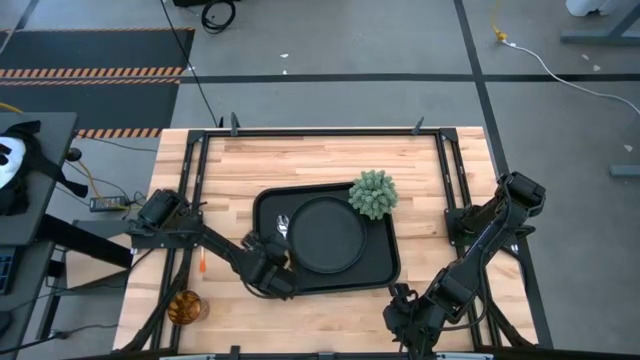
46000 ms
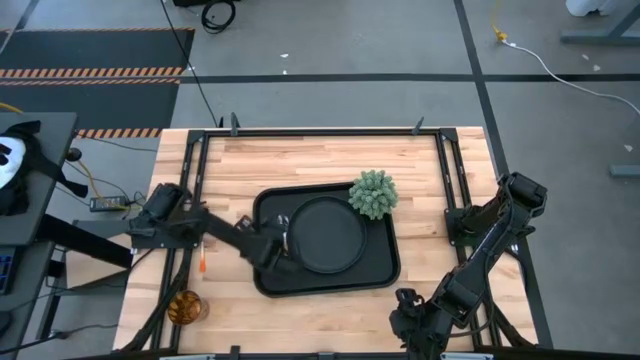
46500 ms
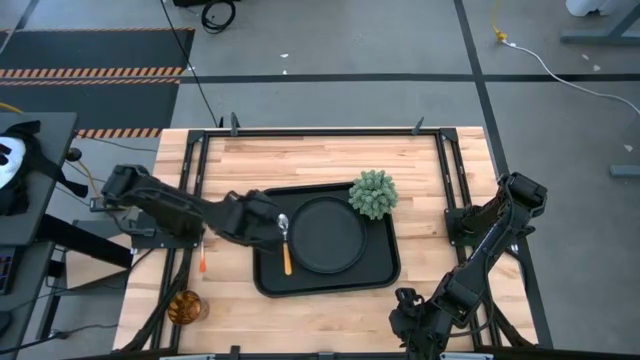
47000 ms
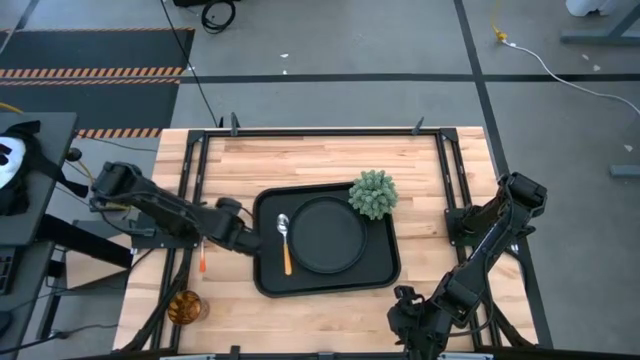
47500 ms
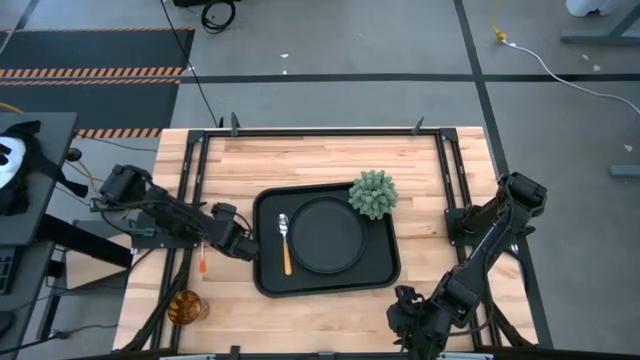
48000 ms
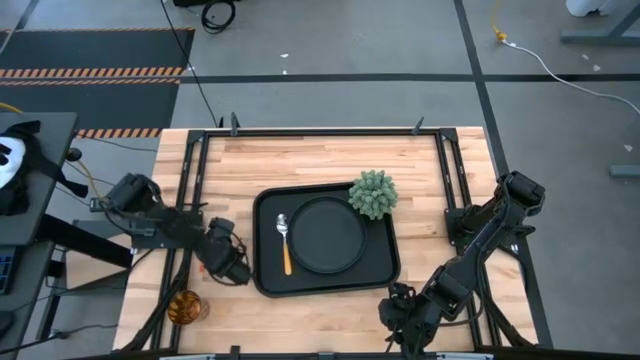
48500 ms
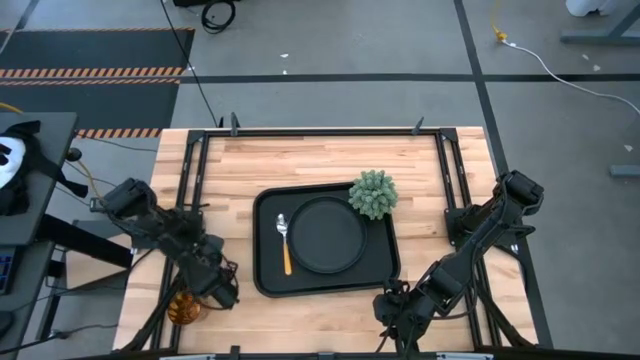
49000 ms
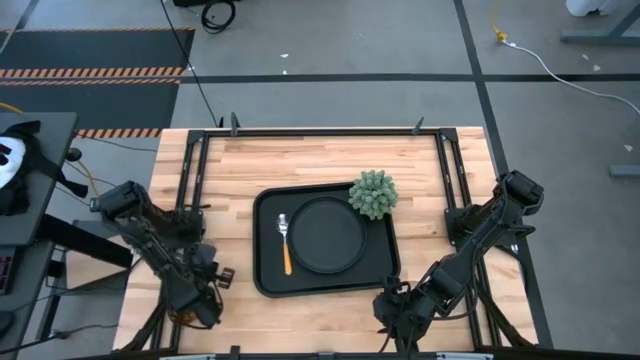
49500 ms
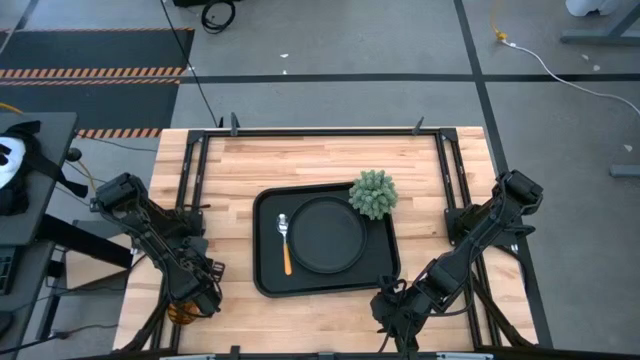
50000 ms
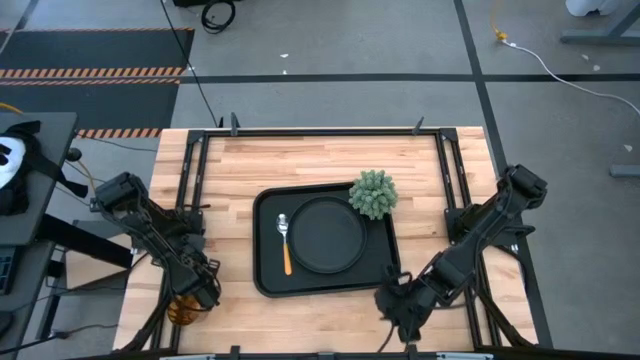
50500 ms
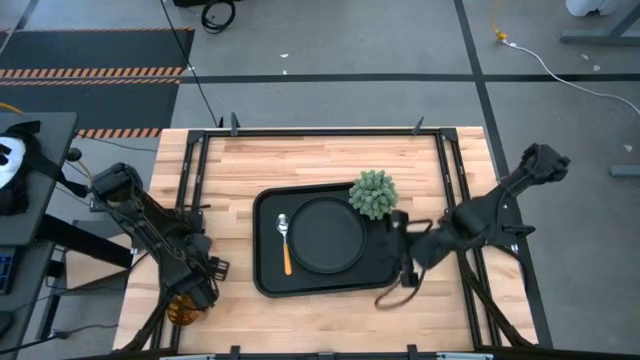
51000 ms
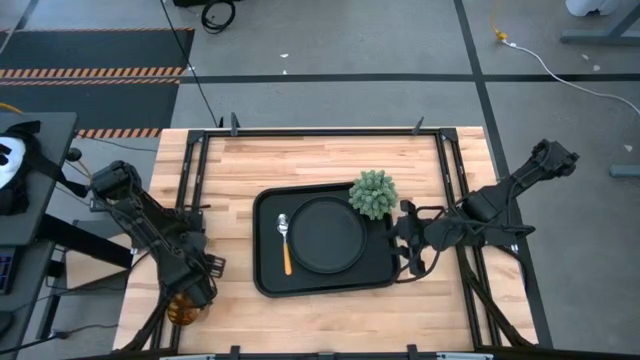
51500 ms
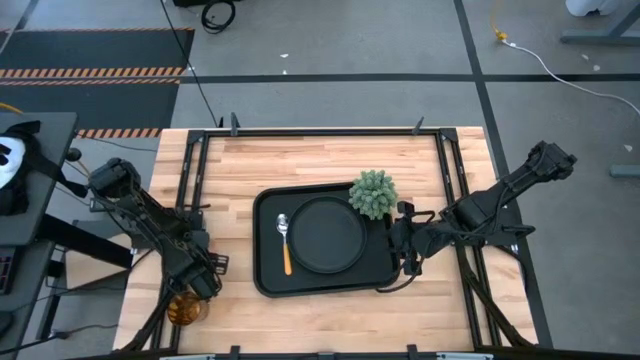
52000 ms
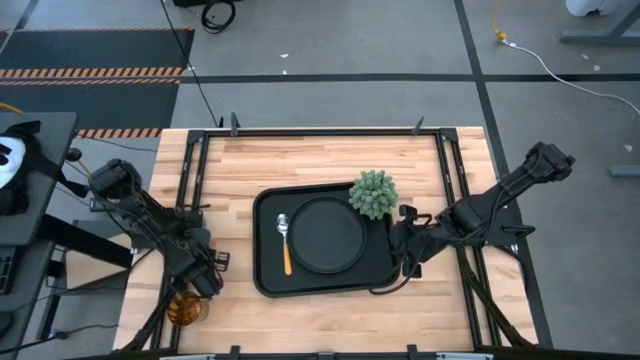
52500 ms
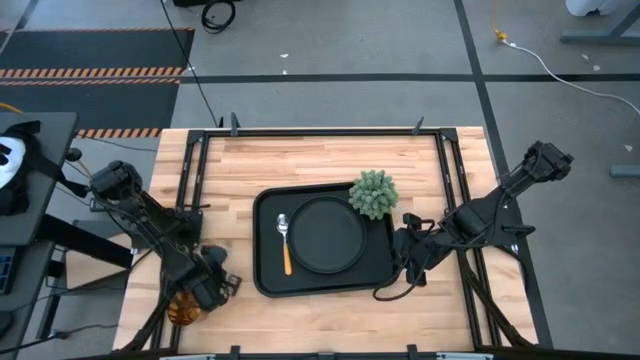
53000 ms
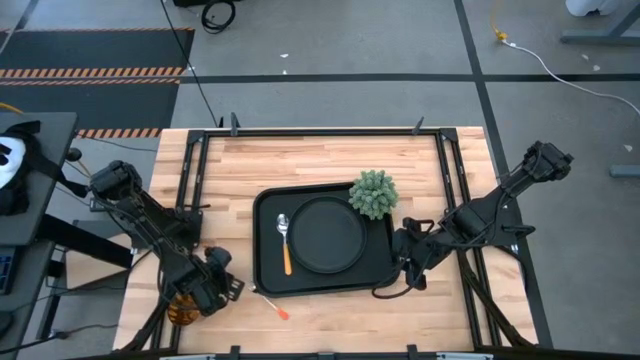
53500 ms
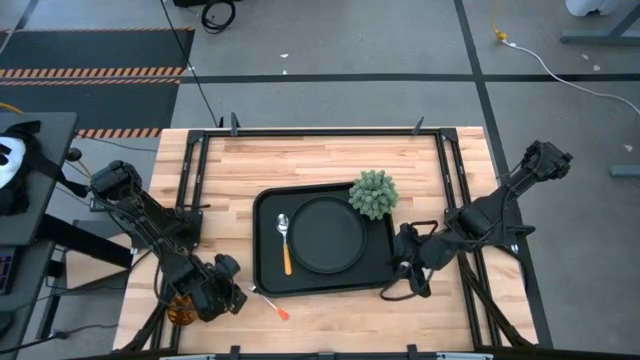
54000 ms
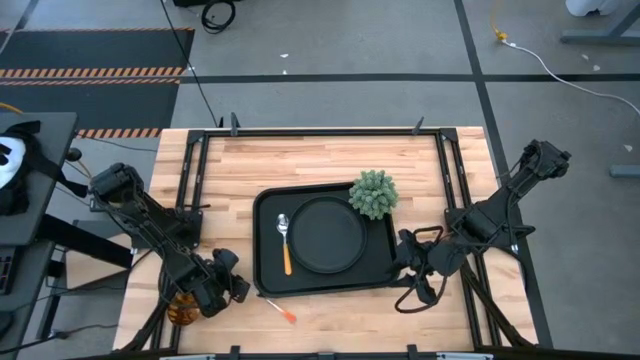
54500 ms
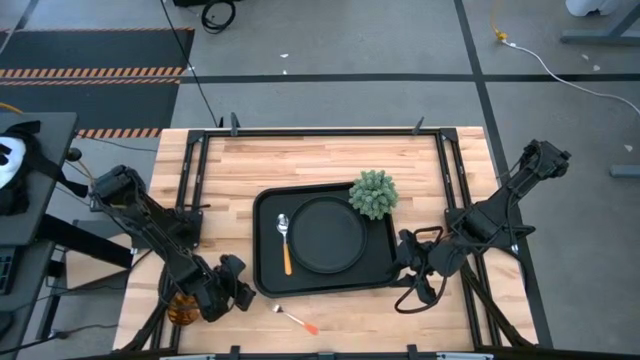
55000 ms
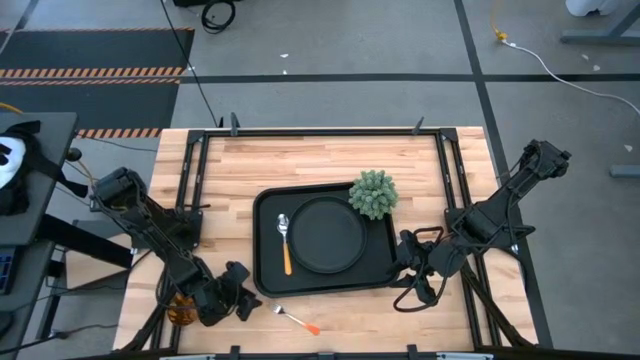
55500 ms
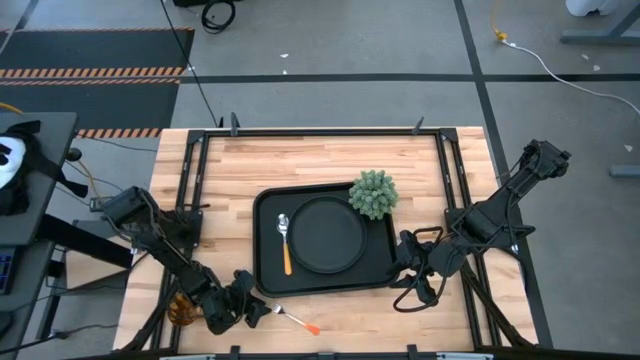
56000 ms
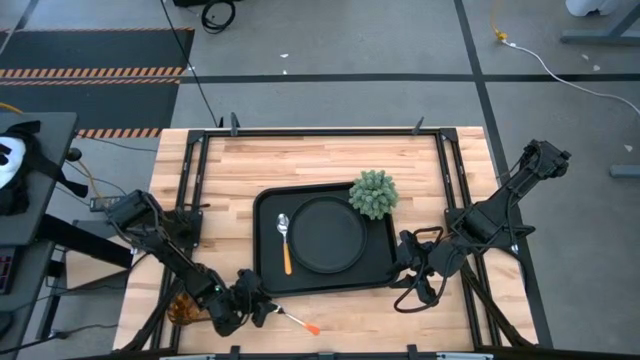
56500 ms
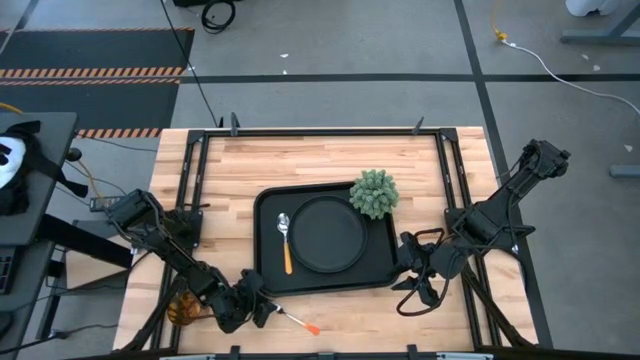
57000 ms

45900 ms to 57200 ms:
Task: Pick and place plate/cup/fork/spoon on tray
Put the orange fork on the black tray to the left of the orange spoon

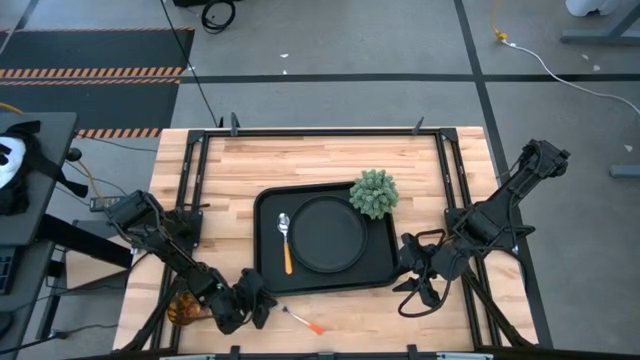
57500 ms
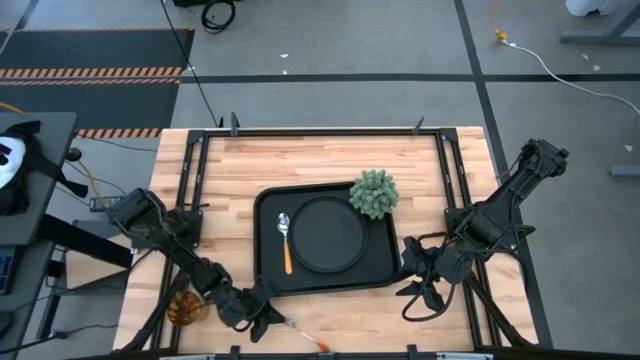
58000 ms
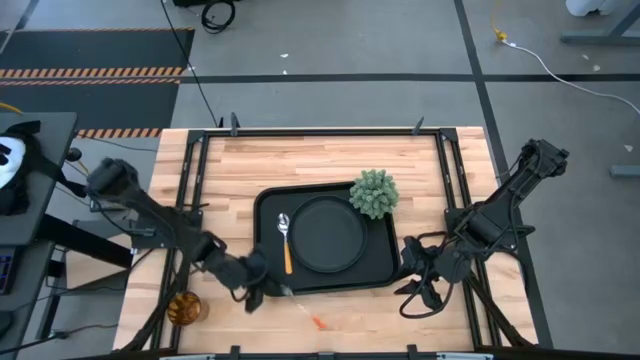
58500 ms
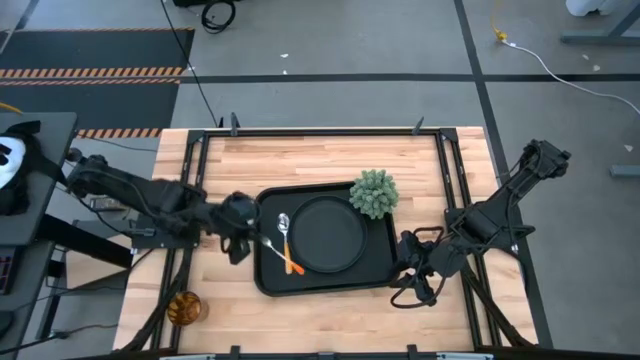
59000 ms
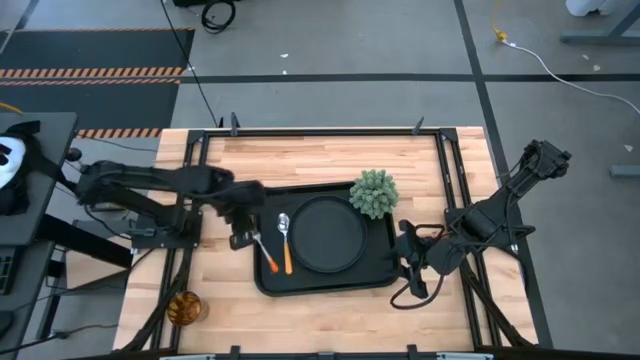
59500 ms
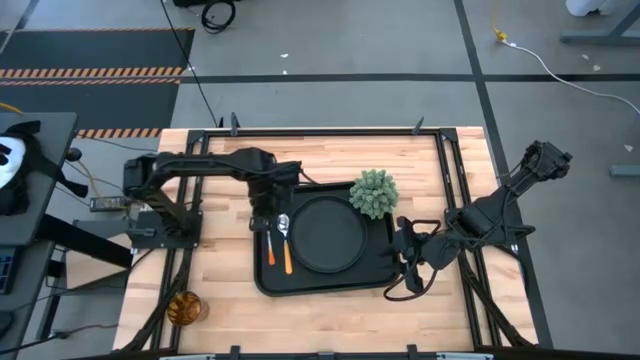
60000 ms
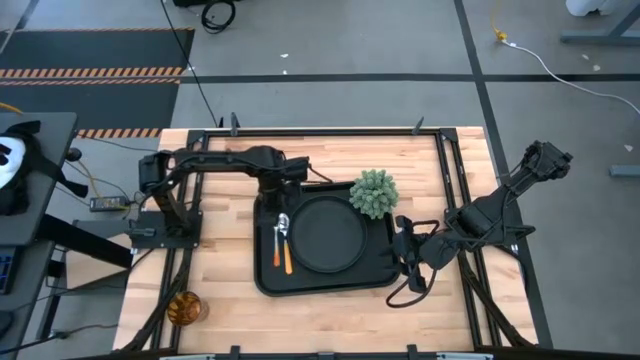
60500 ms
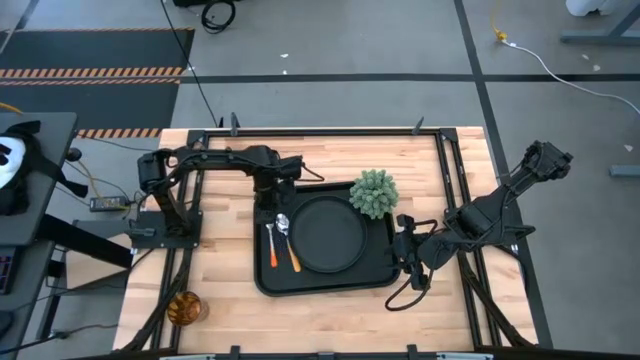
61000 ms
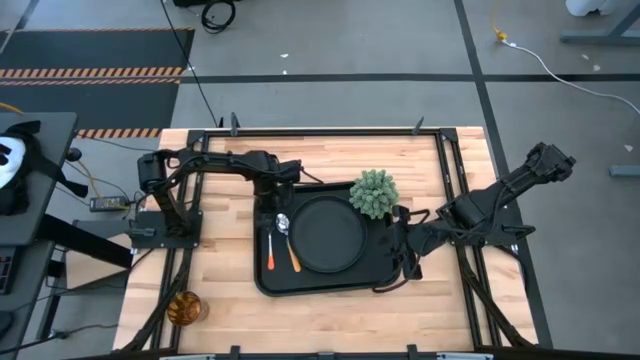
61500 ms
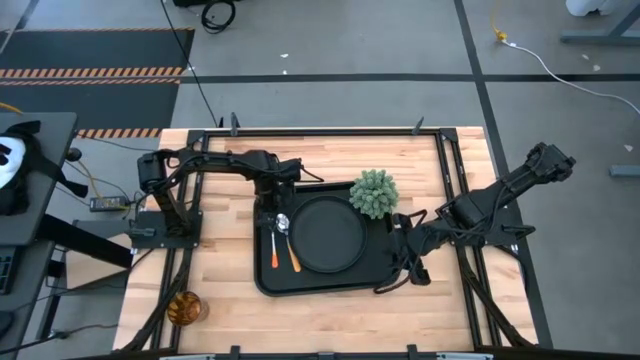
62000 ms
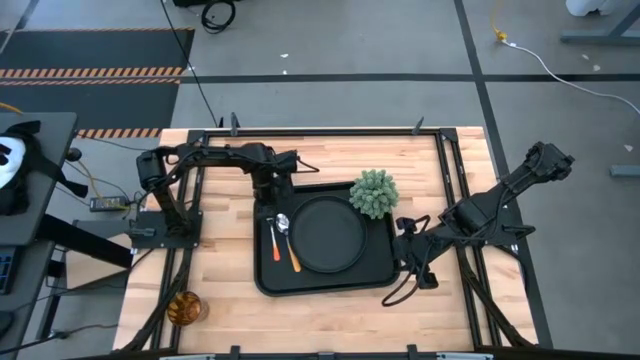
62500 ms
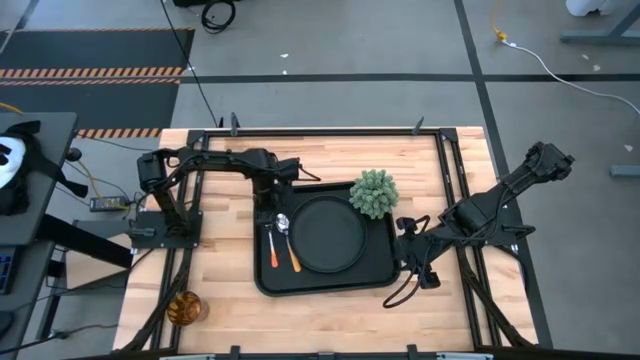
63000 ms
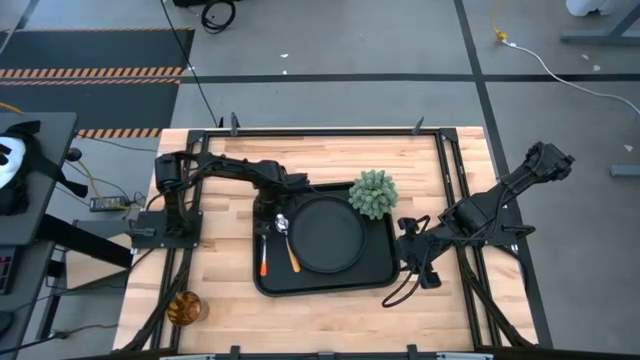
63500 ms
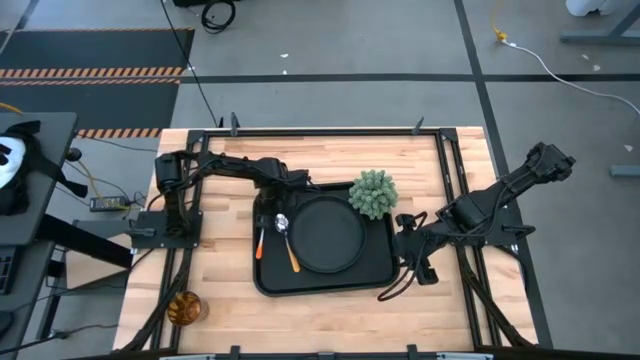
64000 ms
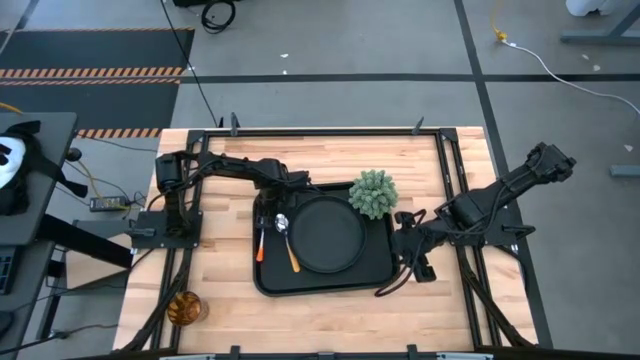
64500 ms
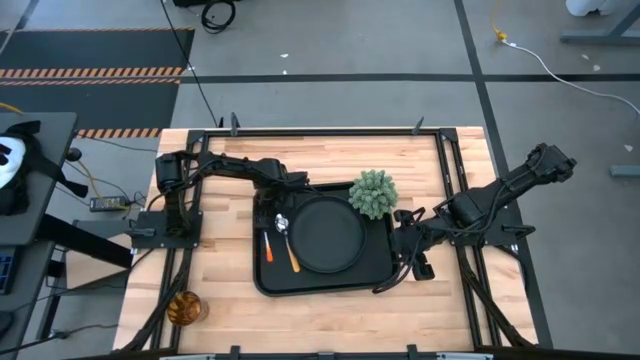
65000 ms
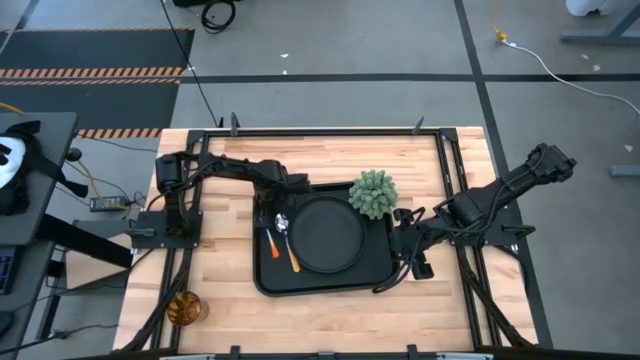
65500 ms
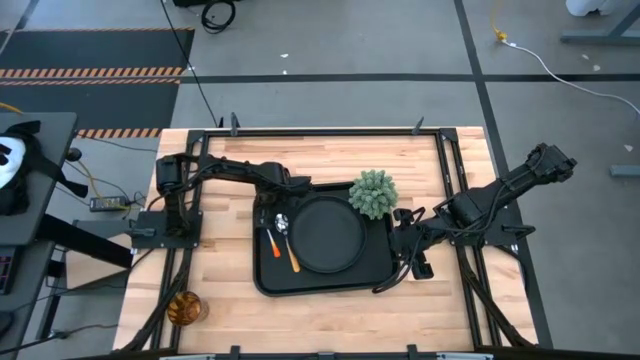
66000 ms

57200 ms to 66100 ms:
Put the orange fork on the black tray to the left of the orange spoon

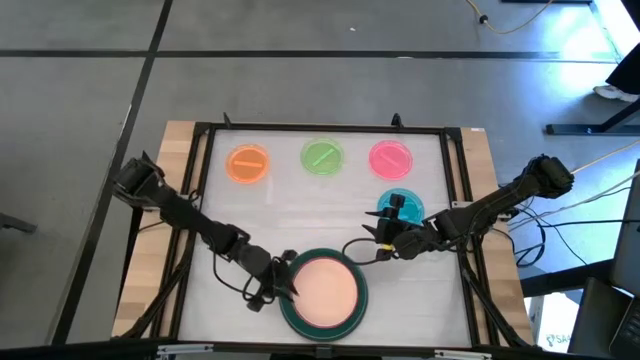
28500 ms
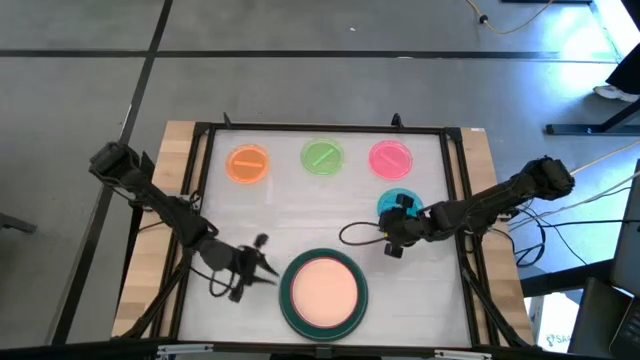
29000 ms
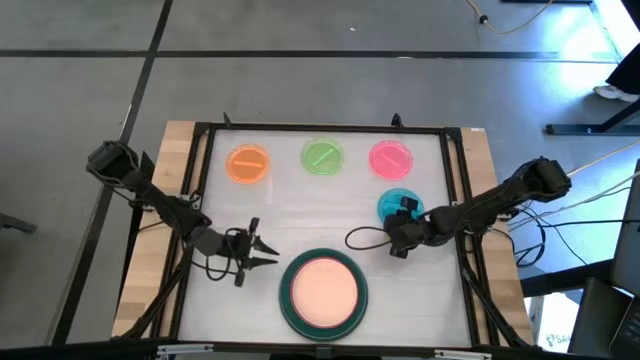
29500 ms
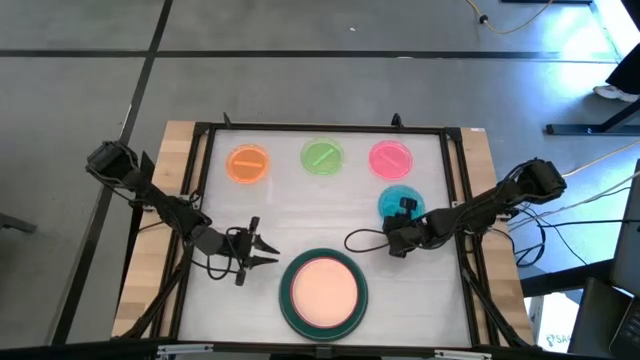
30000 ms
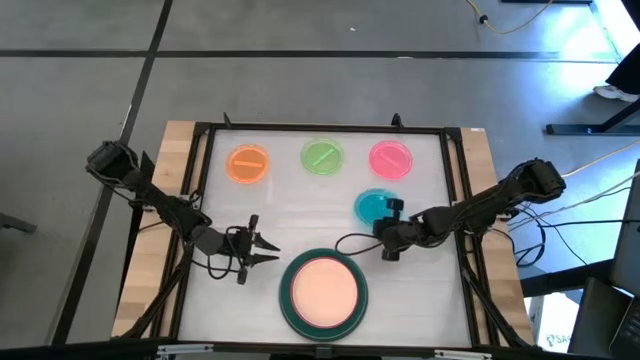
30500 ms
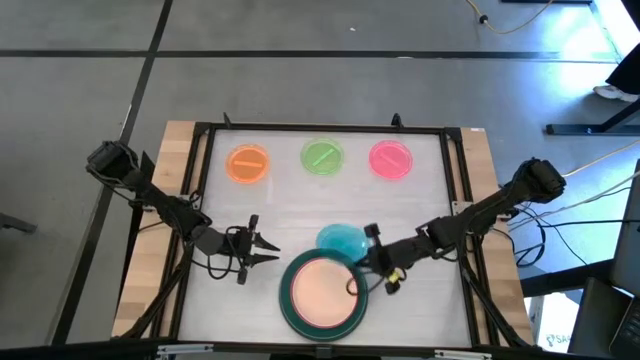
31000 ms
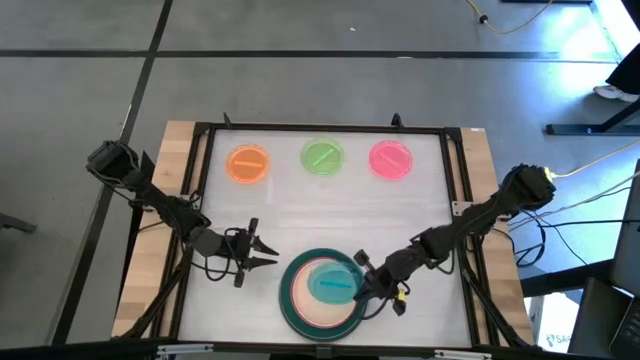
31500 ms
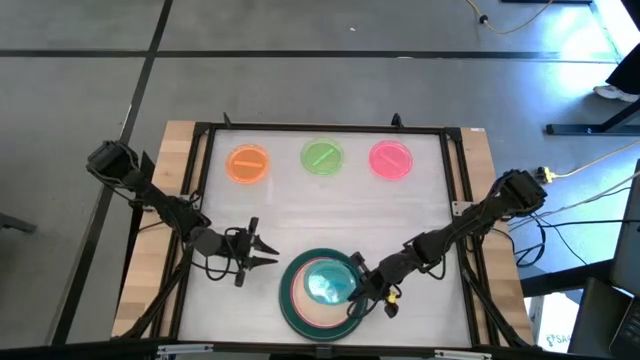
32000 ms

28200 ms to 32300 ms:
Task: Stack plastic plates
Stack the blue plate on top of the orange plate
